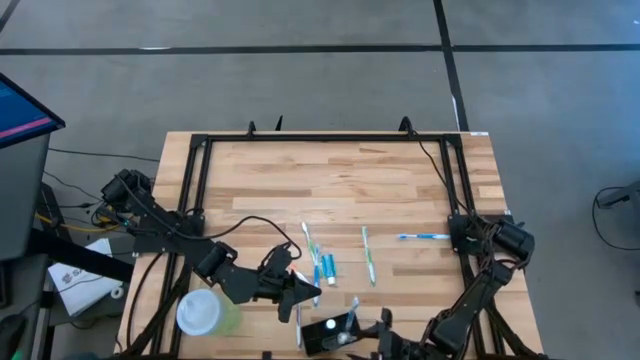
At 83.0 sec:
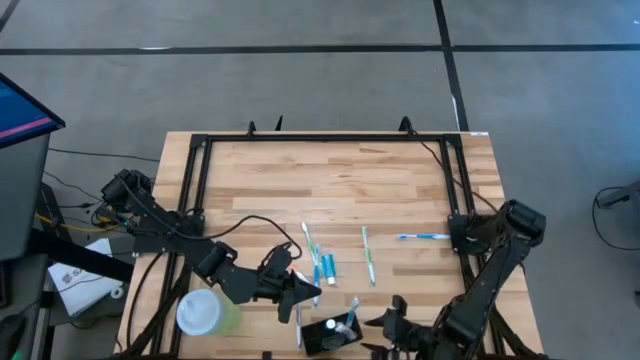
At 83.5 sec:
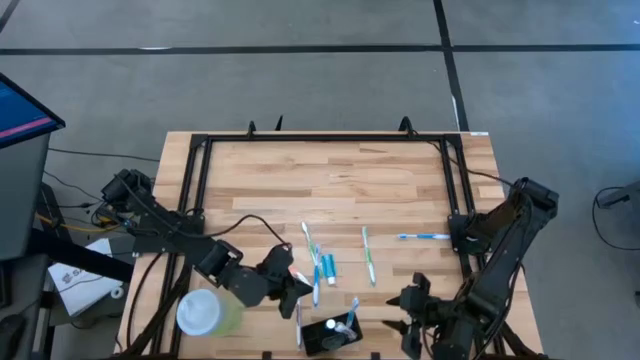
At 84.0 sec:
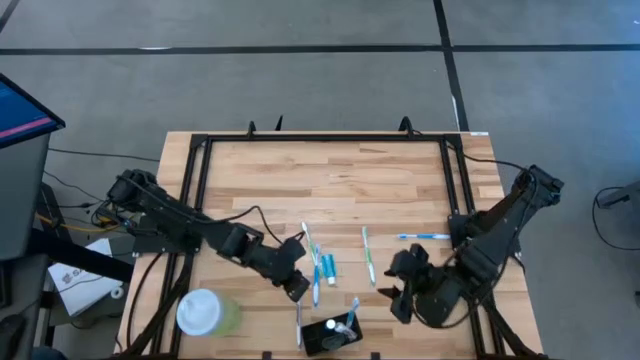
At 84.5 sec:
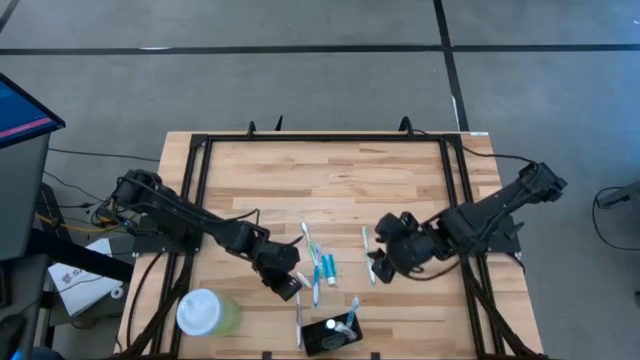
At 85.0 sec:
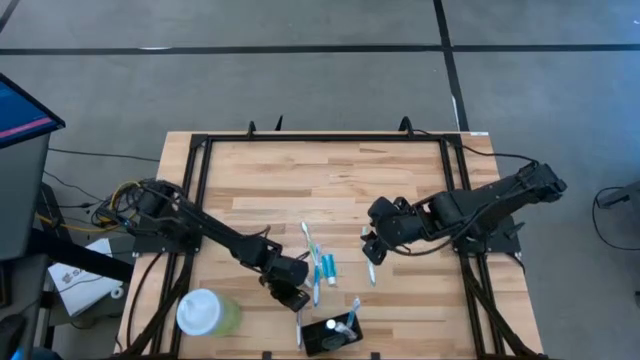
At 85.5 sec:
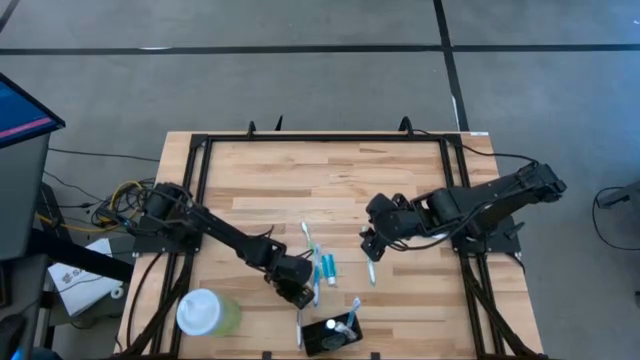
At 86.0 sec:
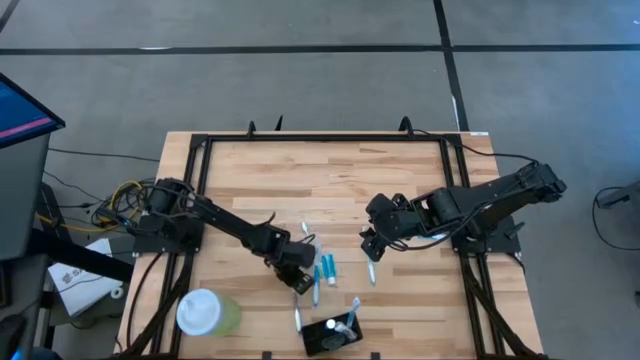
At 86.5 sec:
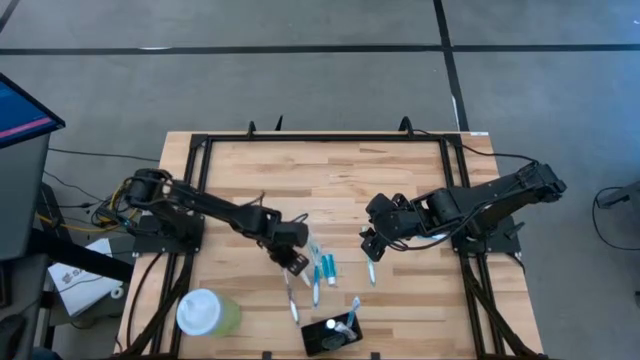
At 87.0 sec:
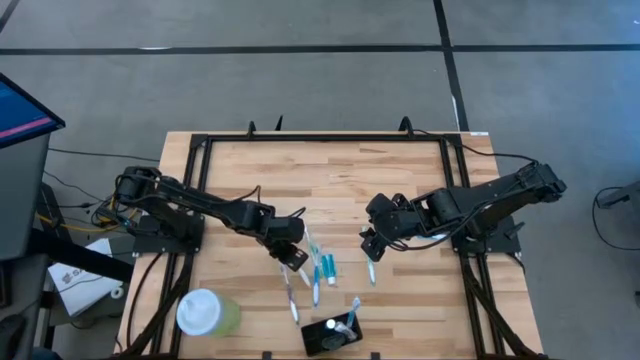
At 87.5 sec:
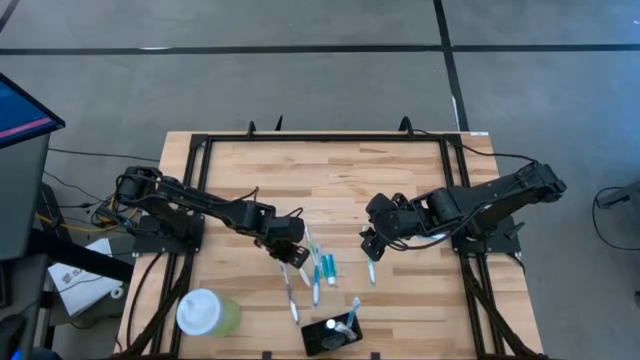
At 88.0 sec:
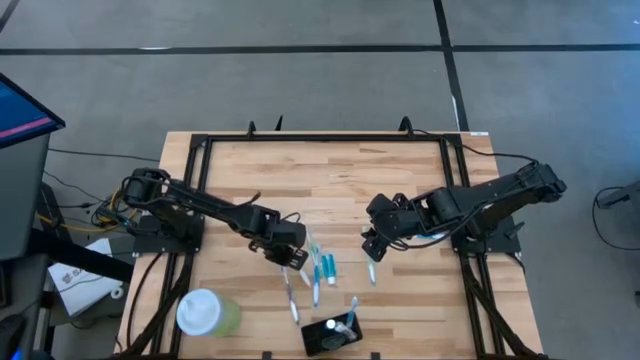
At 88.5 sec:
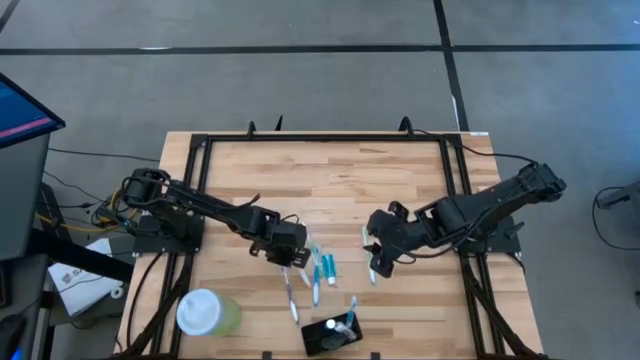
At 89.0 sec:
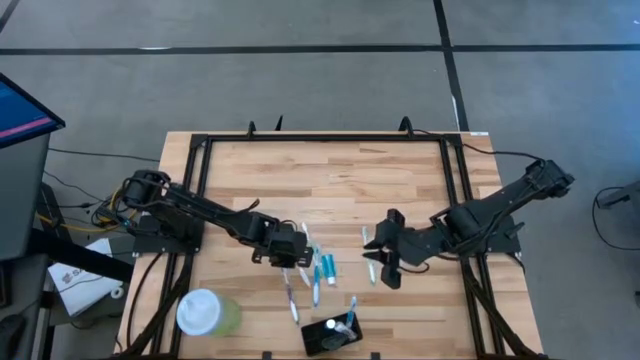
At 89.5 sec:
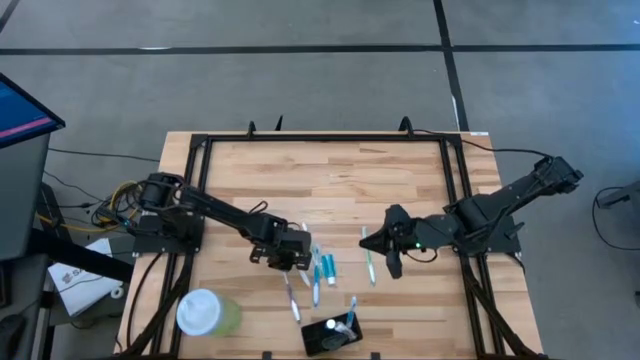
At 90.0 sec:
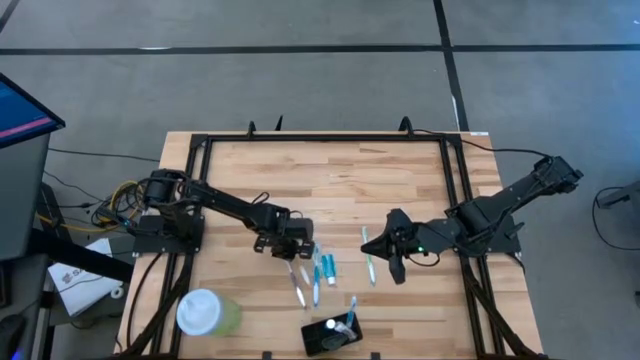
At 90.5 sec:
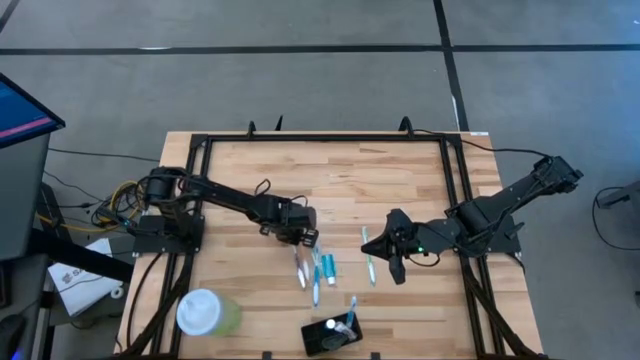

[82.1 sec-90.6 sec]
Task: Pick & Place toothbrushing station
Move the violet toothbrush to the center of the table

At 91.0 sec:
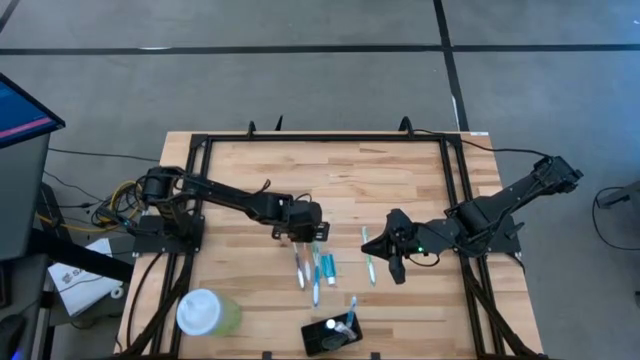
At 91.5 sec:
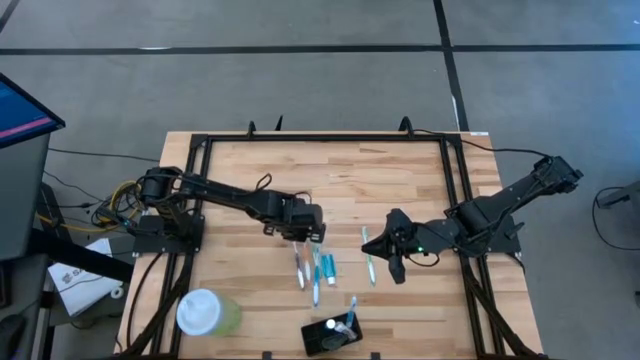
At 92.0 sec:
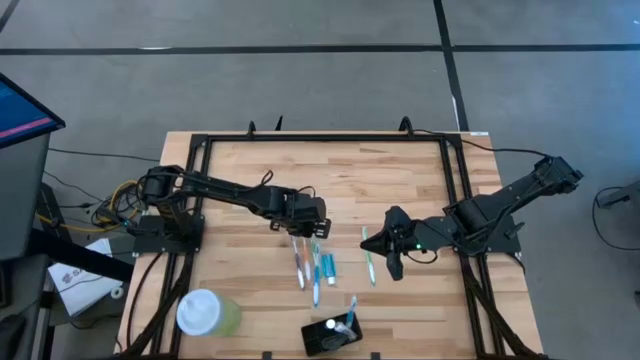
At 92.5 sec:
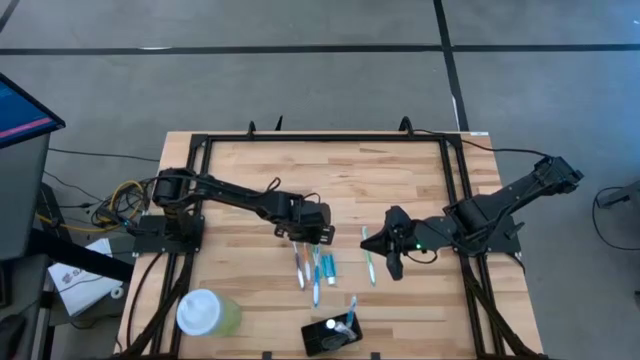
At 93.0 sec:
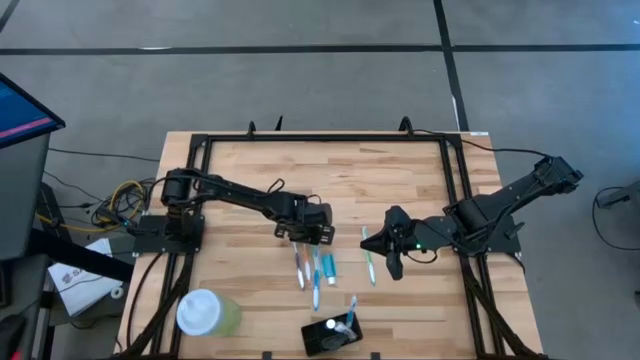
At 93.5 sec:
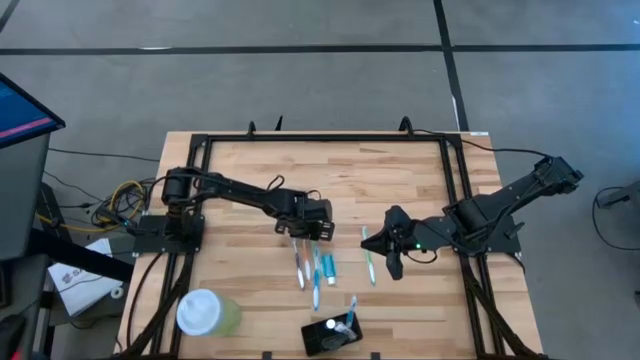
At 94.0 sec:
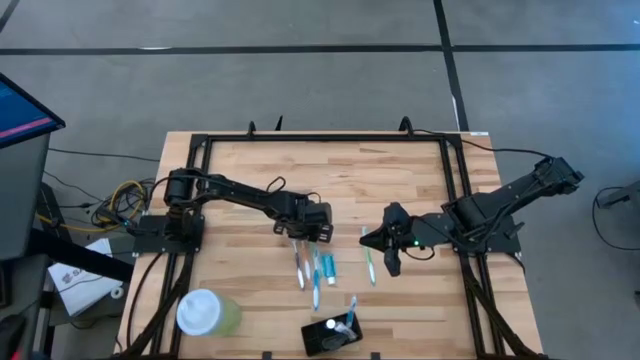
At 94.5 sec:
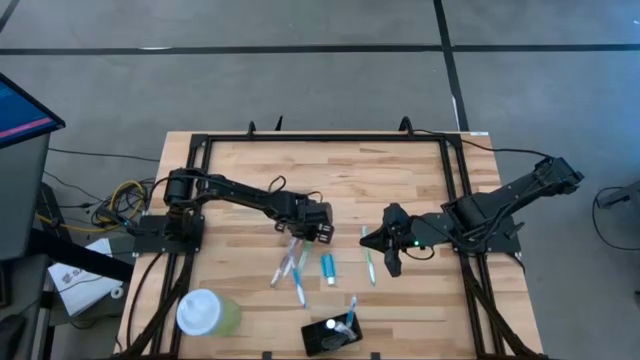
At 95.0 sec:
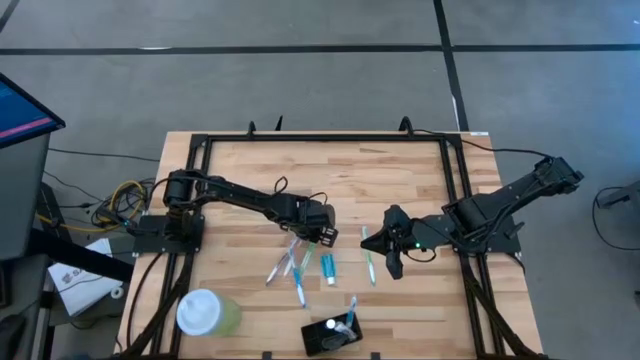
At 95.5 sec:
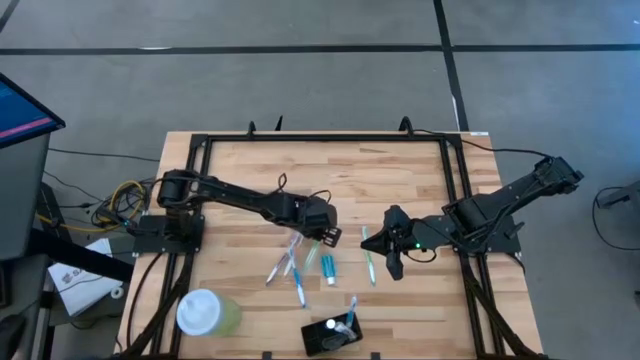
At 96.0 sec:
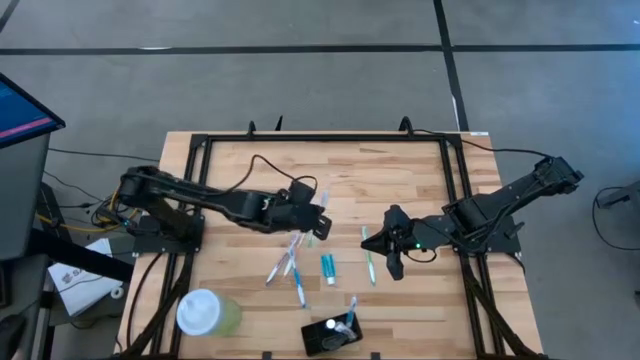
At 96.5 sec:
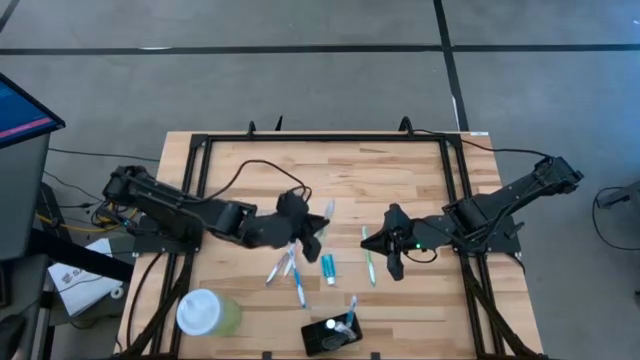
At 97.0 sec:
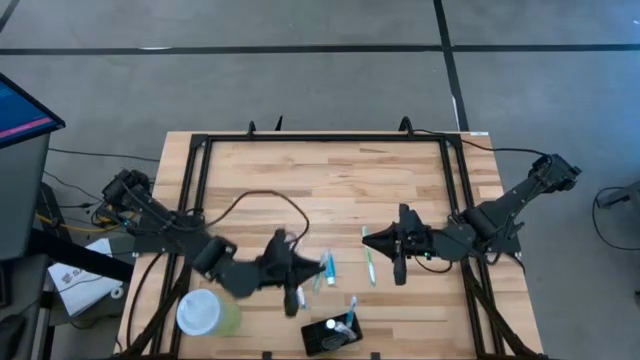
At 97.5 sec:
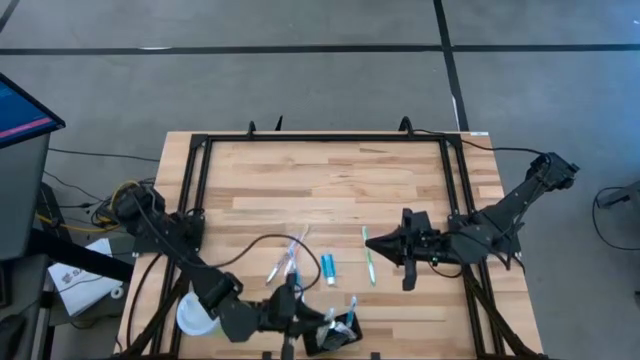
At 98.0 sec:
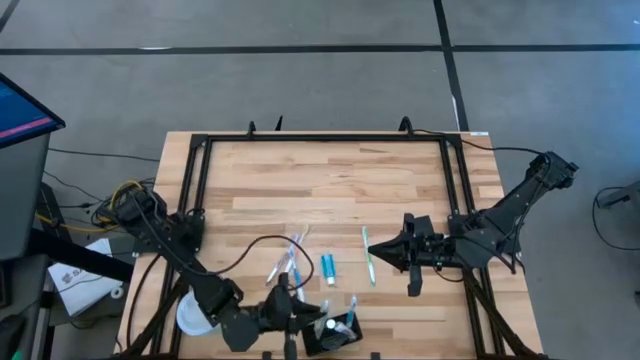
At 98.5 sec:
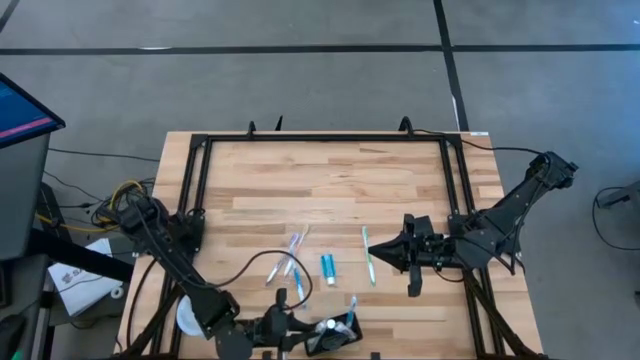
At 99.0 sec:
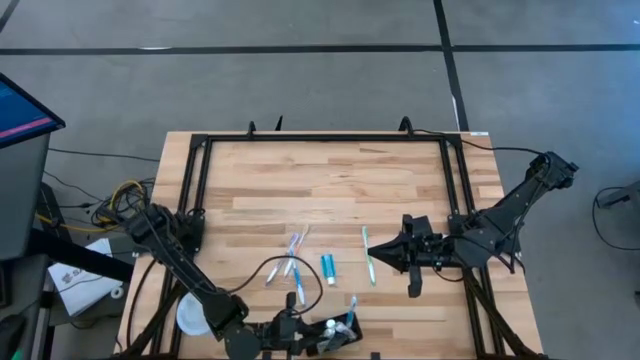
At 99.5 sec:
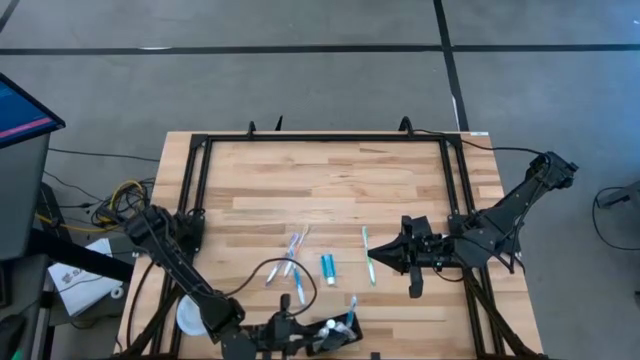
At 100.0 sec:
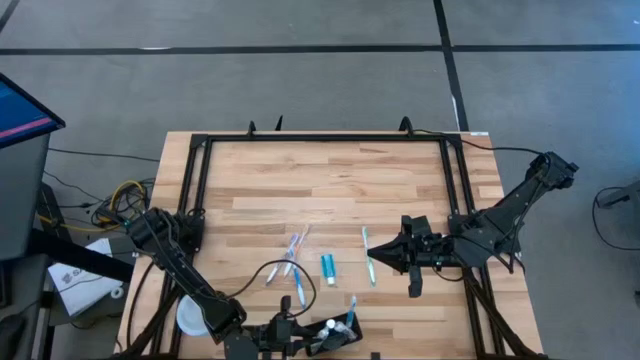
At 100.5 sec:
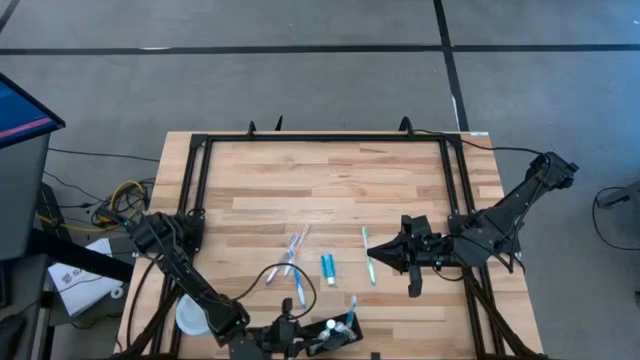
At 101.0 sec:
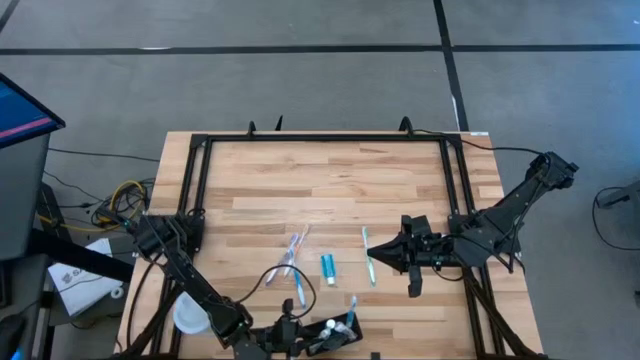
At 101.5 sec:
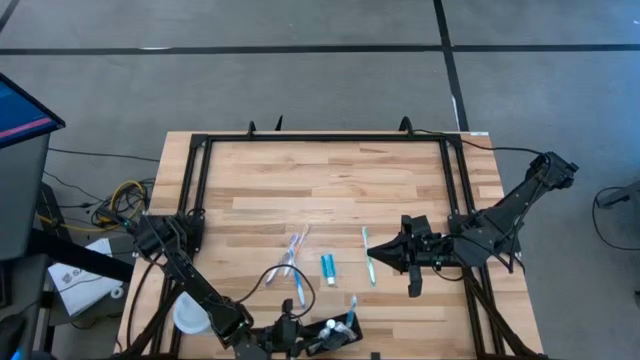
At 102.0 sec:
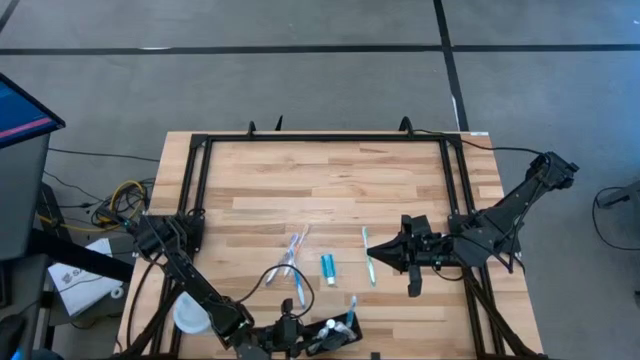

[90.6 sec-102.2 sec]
Put the left green toothbrush into the black wire organizer
